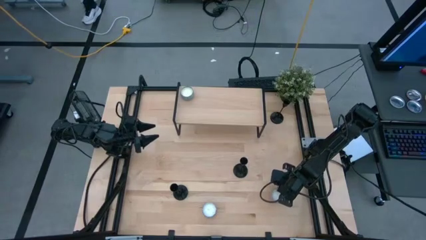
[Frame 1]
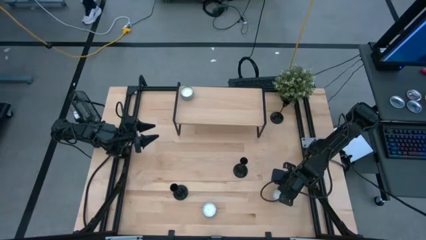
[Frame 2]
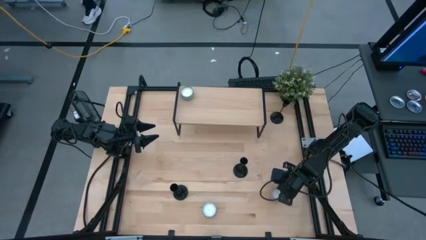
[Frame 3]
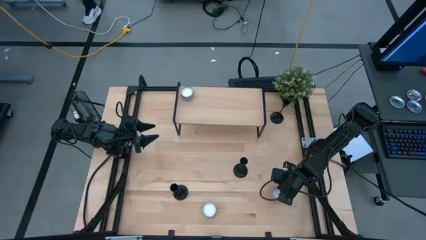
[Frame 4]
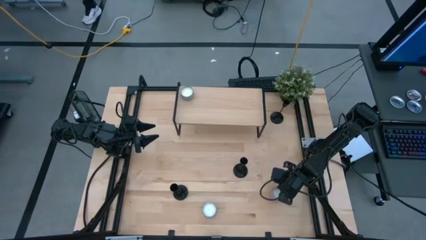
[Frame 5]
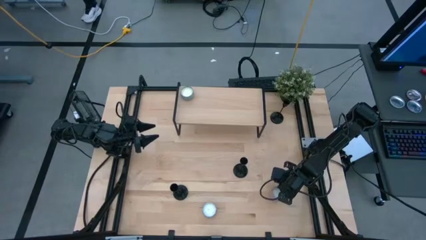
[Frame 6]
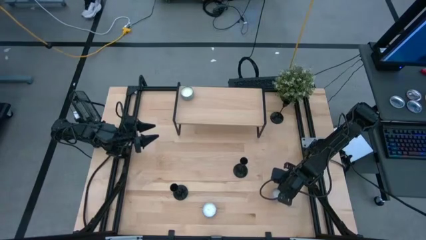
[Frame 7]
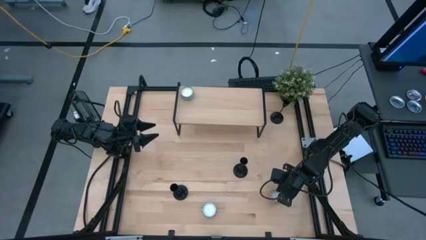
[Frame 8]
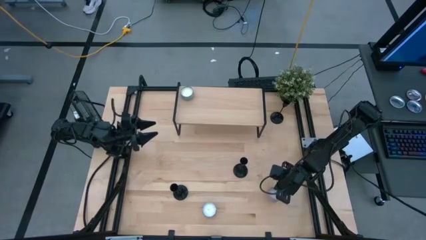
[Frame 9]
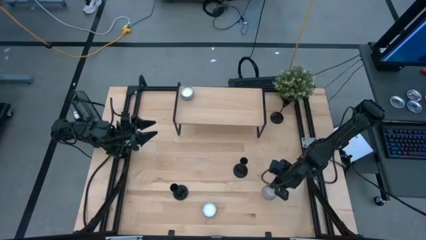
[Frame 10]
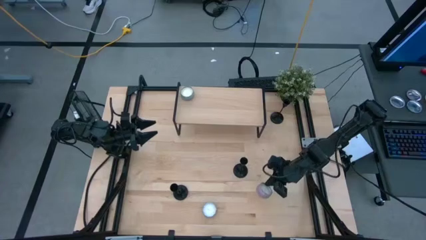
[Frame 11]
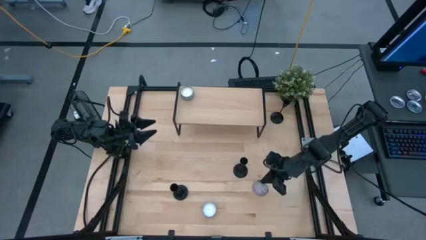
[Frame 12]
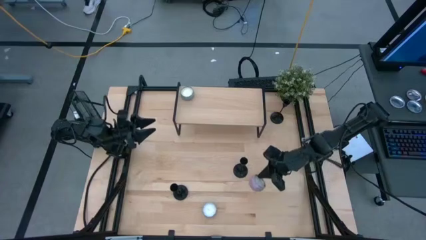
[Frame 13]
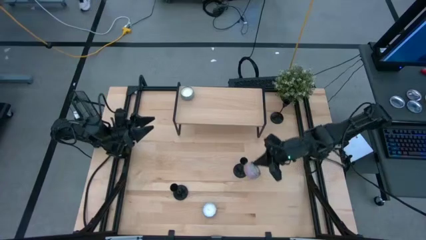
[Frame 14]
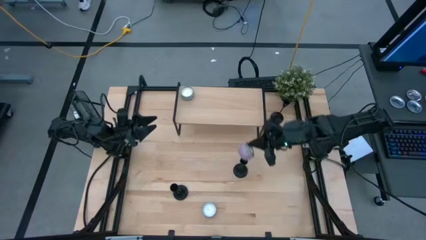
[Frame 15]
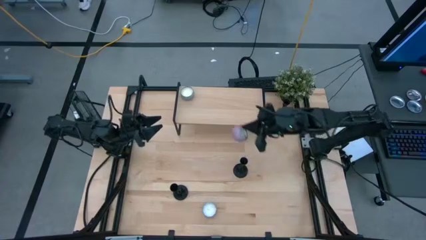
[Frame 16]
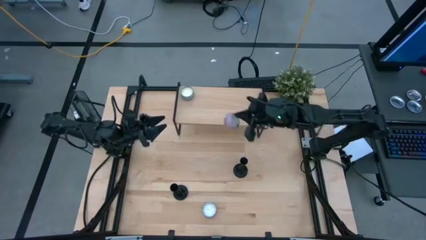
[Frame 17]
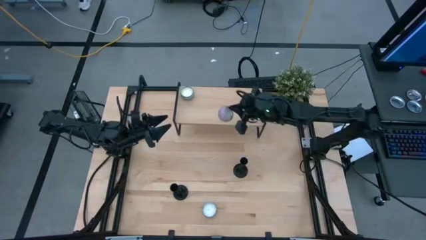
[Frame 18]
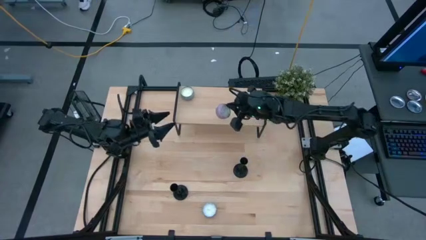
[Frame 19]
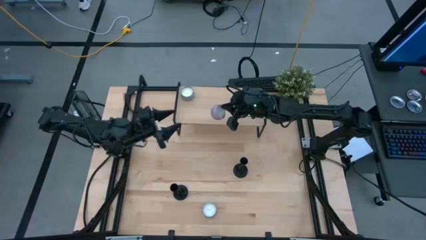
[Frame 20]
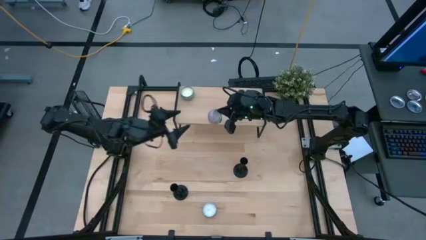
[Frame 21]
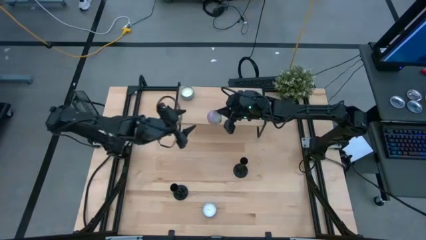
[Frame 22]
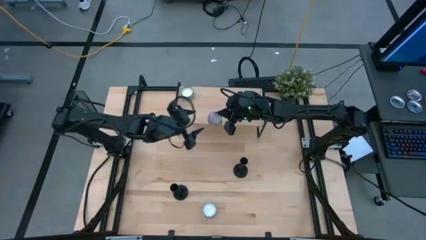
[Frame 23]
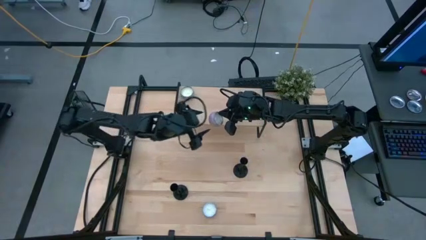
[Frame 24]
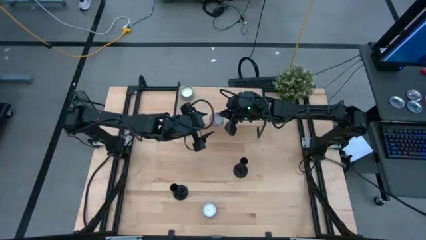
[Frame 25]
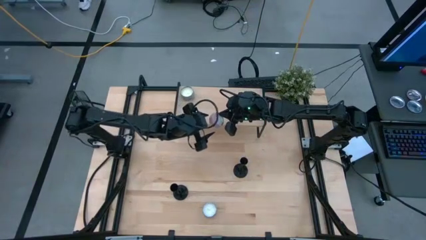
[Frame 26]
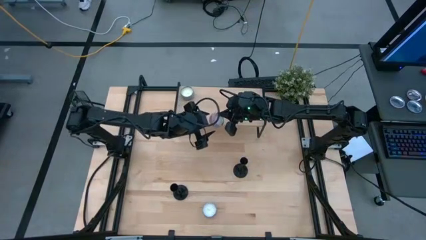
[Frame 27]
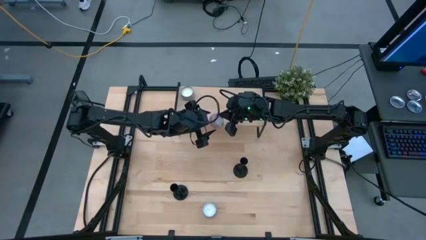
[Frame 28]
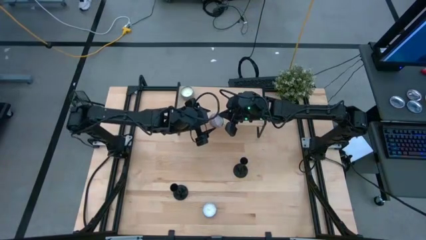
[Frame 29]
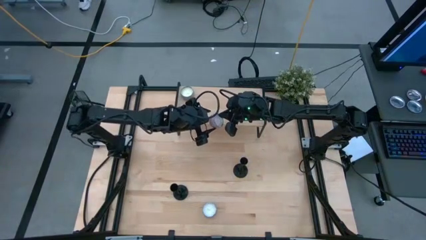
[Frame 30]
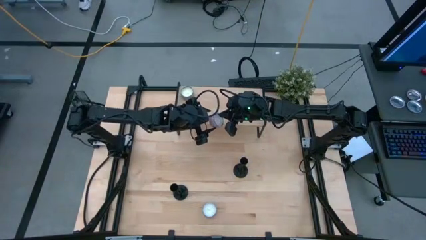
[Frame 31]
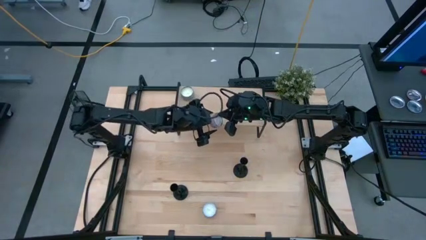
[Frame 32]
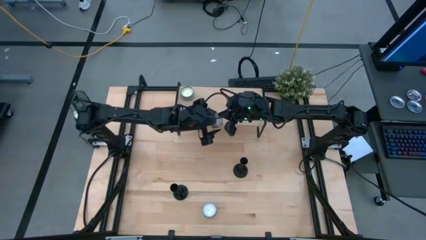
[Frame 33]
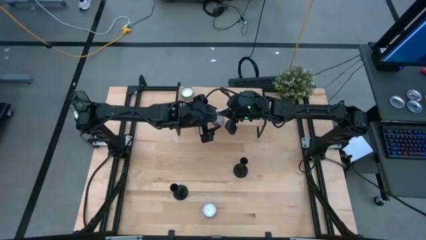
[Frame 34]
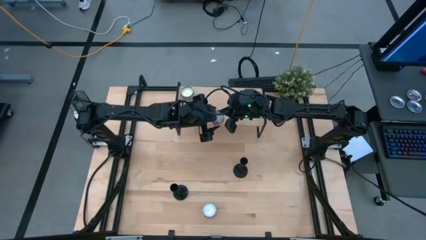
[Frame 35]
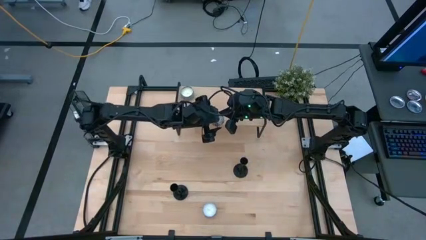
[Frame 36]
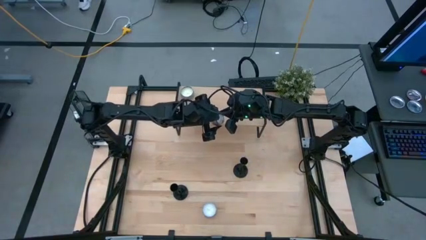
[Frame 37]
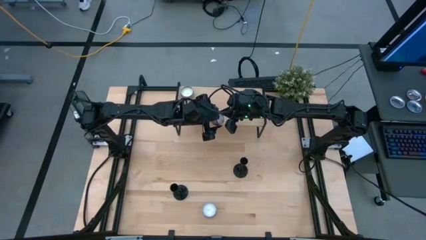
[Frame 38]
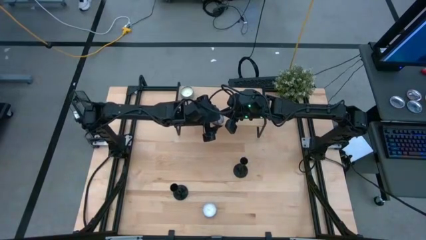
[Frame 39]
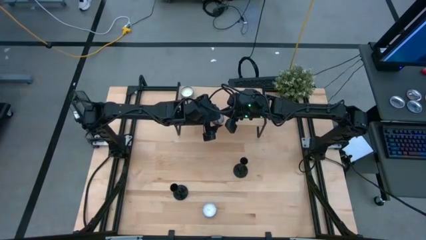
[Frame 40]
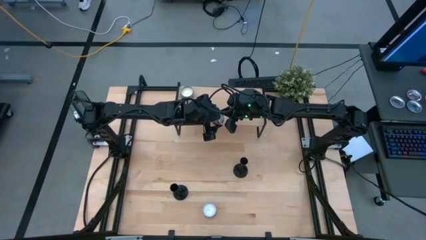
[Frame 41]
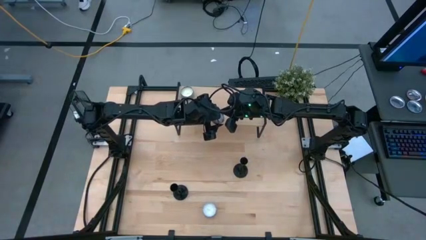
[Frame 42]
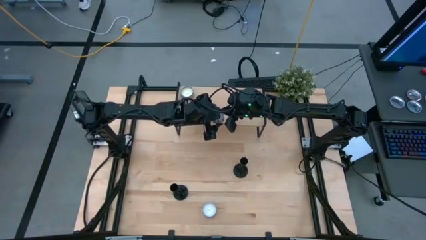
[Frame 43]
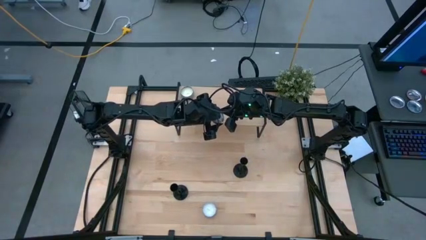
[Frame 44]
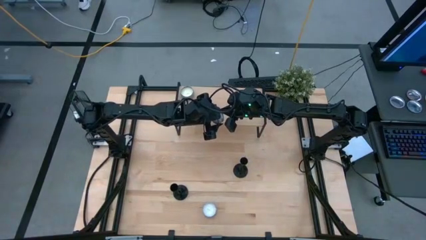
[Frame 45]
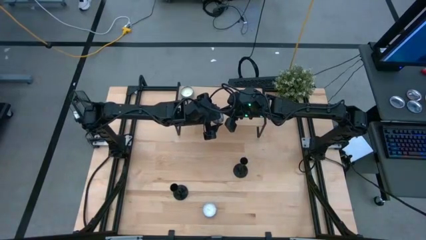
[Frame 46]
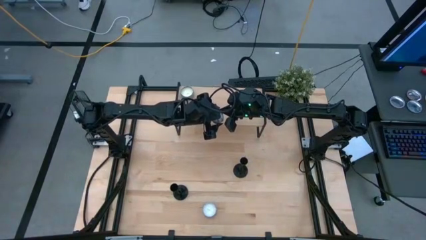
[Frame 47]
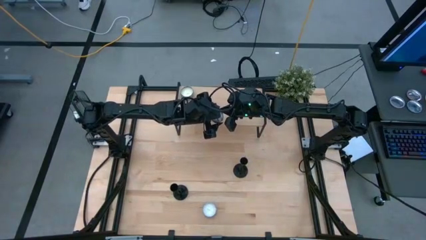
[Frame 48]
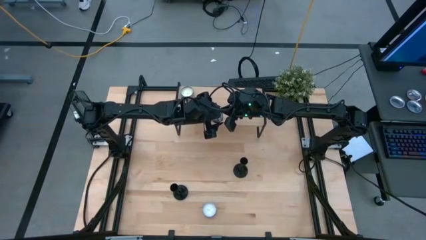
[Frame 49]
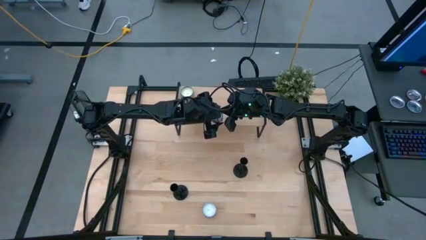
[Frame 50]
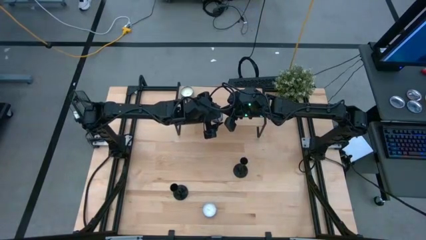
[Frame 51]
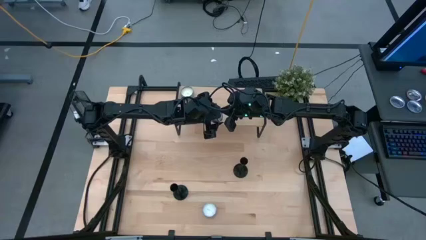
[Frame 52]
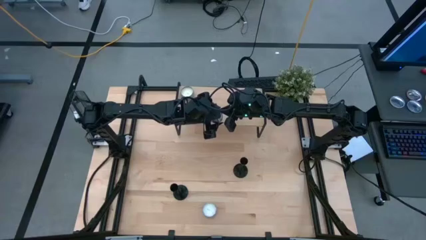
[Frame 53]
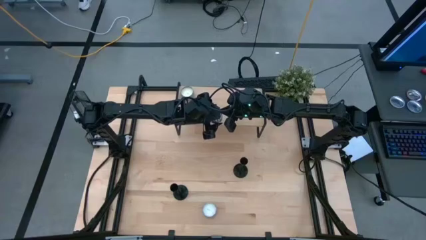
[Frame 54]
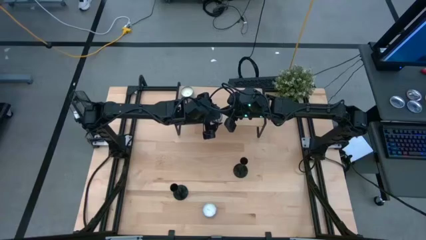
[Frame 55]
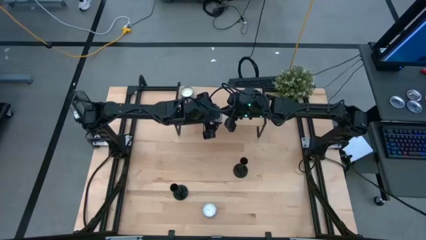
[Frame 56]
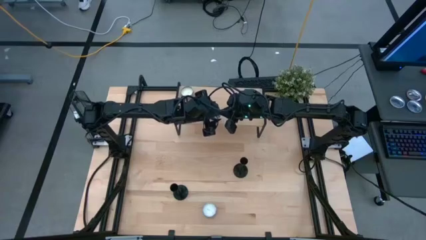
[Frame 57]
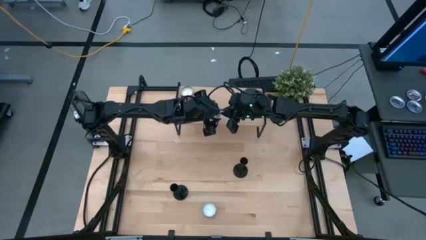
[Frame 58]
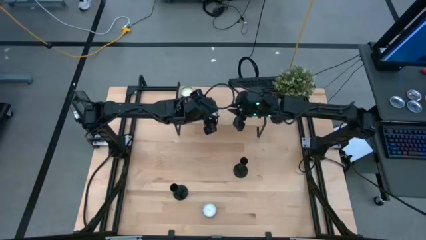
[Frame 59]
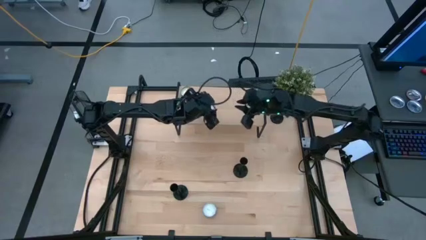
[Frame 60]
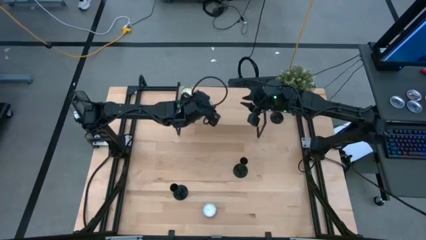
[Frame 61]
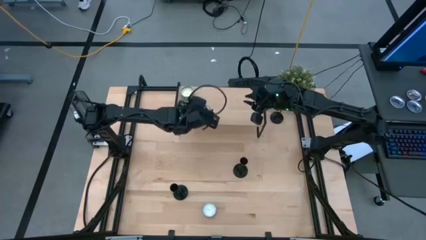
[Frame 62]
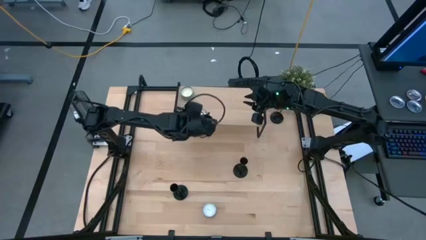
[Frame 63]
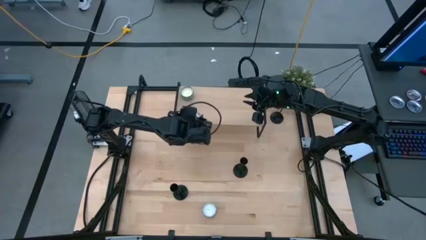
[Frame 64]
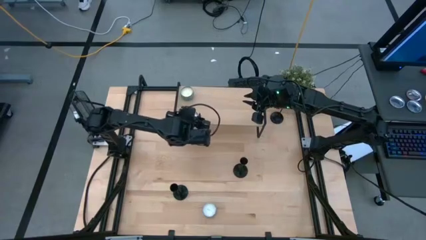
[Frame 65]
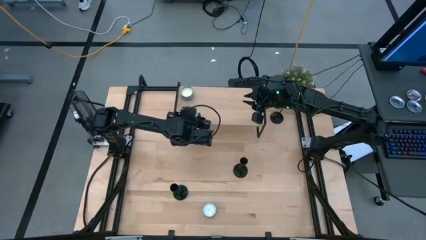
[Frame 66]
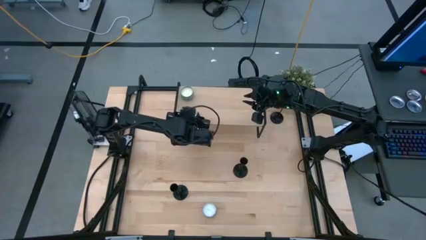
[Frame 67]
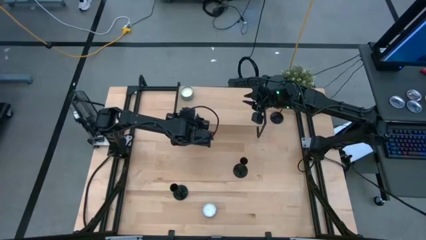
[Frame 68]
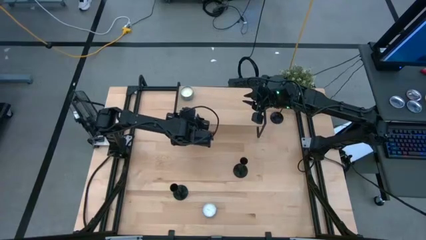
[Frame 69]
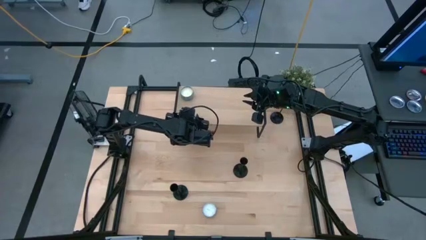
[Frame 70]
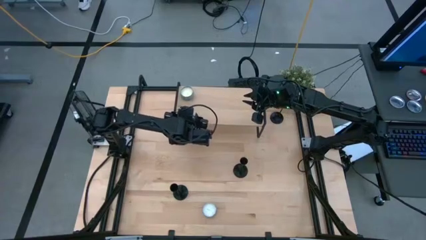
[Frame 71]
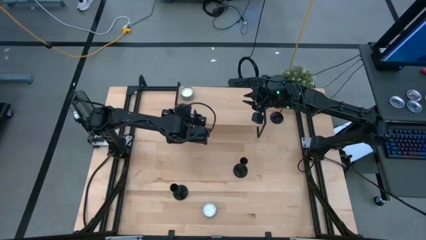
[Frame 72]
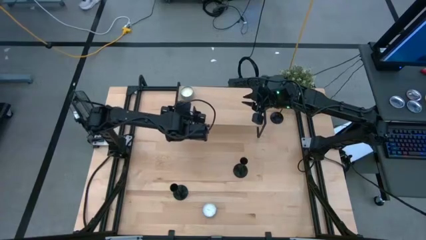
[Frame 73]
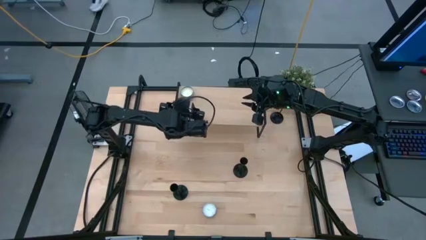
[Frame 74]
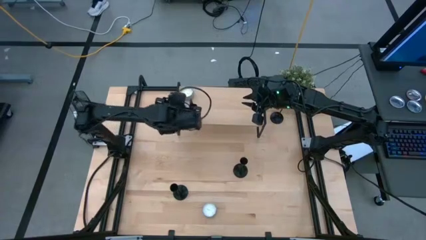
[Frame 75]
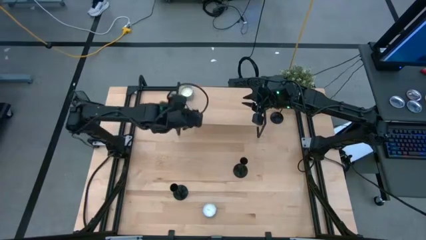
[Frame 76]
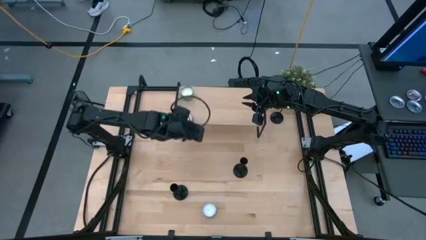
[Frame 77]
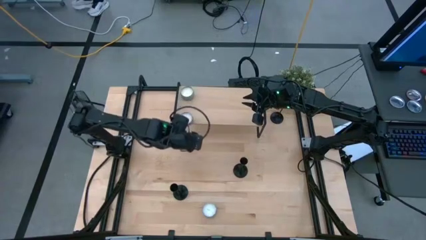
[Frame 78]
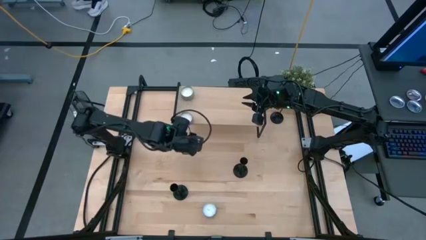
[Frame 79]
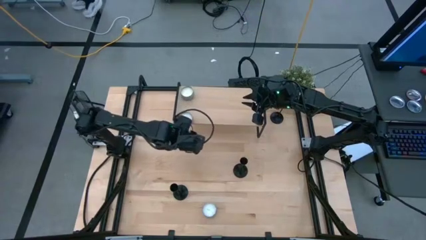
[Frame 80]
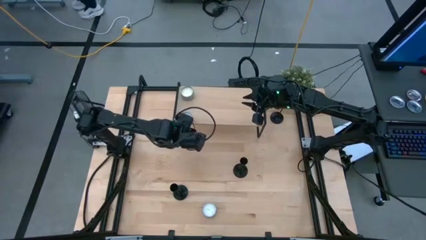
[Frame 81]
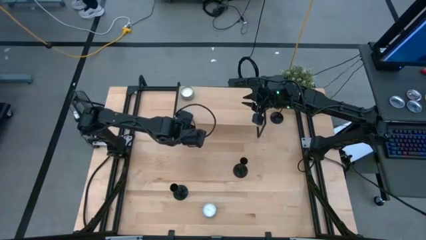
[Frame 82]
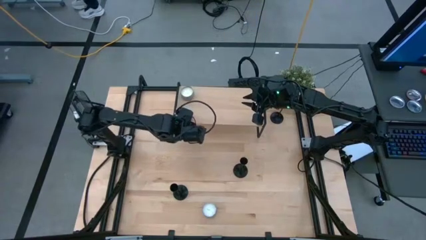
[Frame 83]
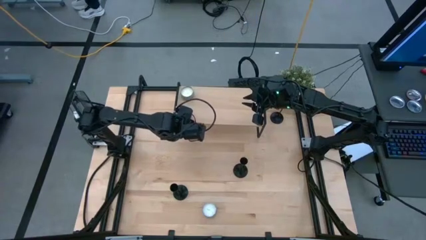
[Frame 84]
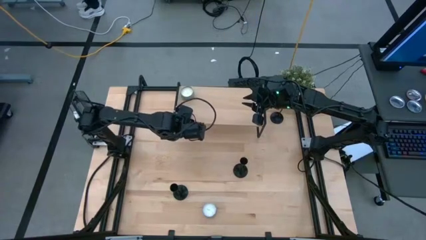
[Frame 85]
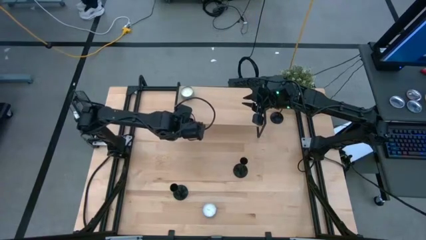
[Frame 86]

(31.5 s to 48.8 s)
Task: Pick & Place candle stick holders
Put the pink scented candle on the shelf
